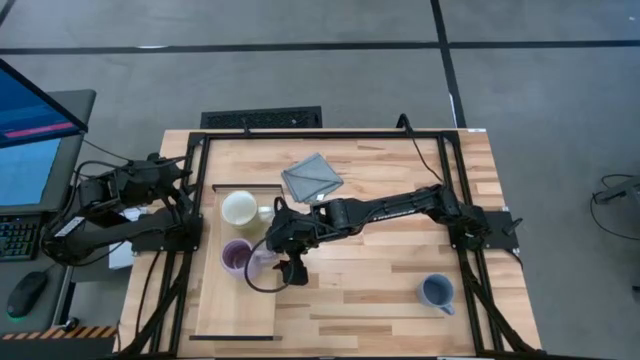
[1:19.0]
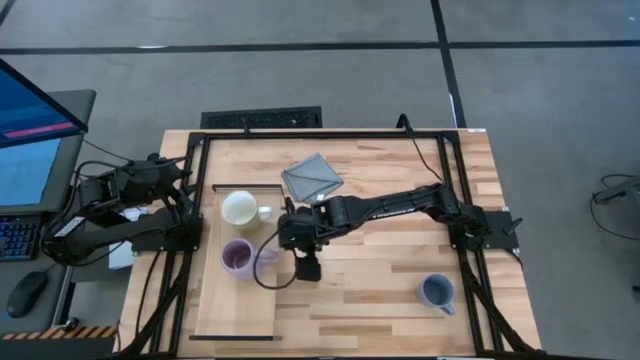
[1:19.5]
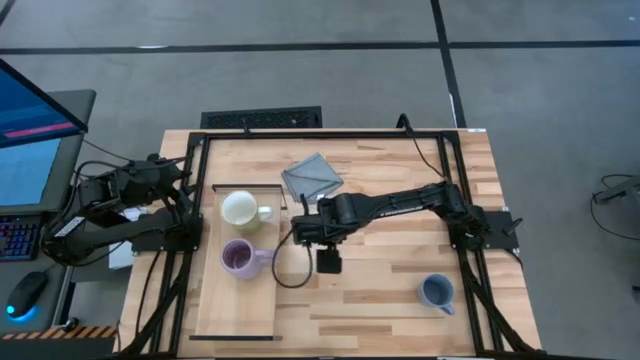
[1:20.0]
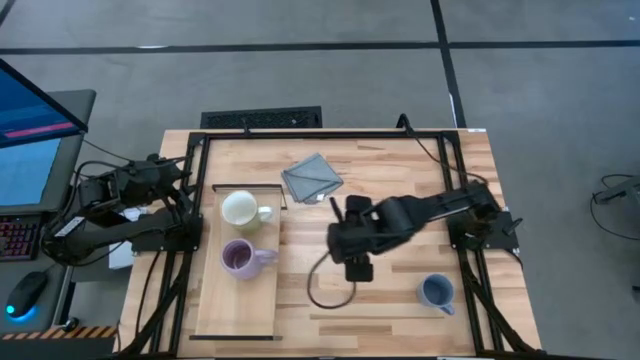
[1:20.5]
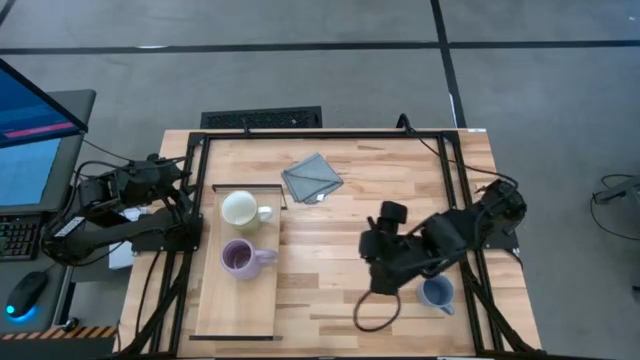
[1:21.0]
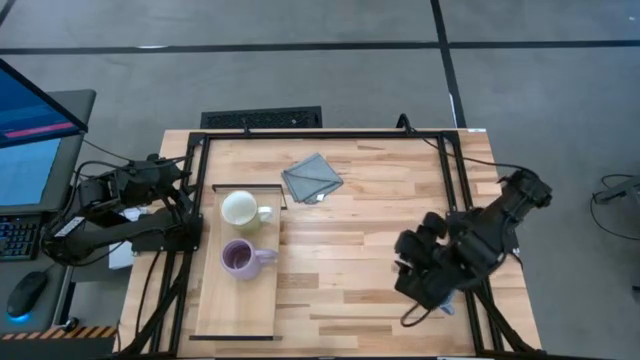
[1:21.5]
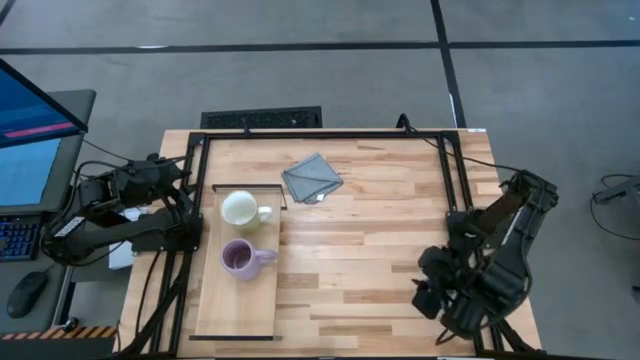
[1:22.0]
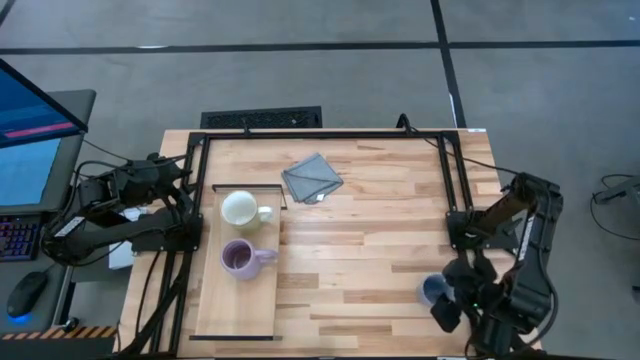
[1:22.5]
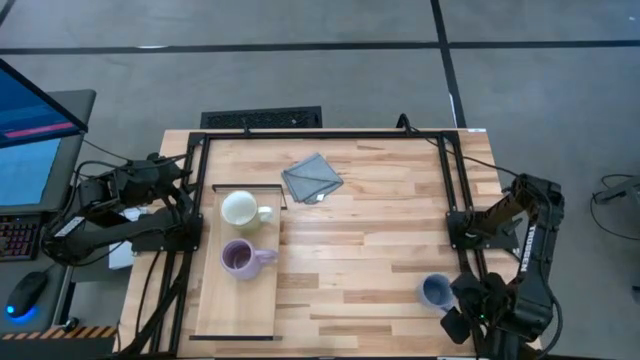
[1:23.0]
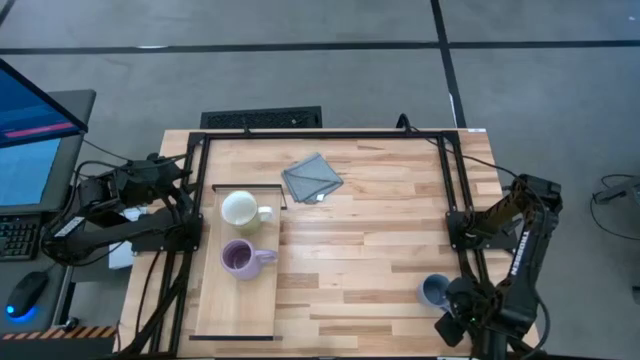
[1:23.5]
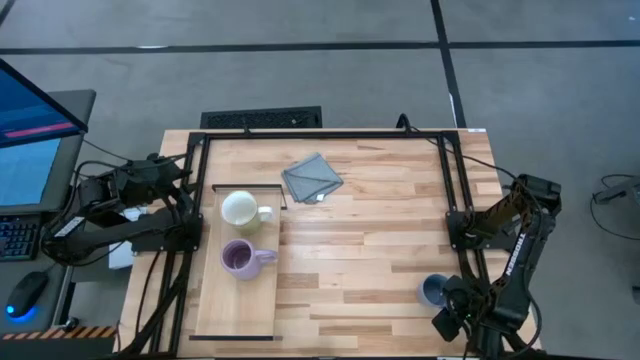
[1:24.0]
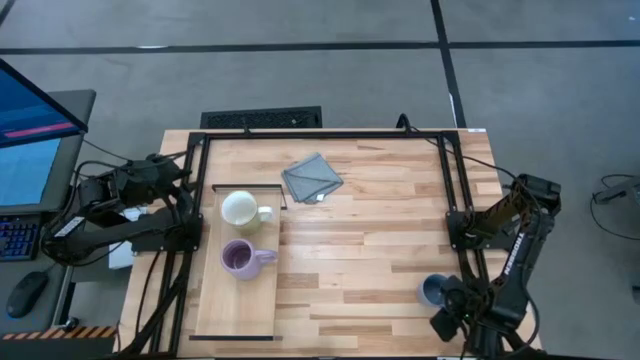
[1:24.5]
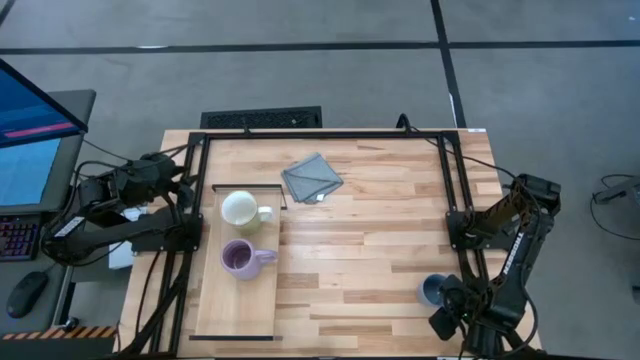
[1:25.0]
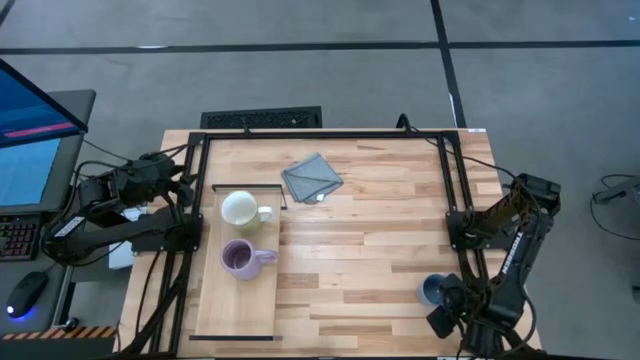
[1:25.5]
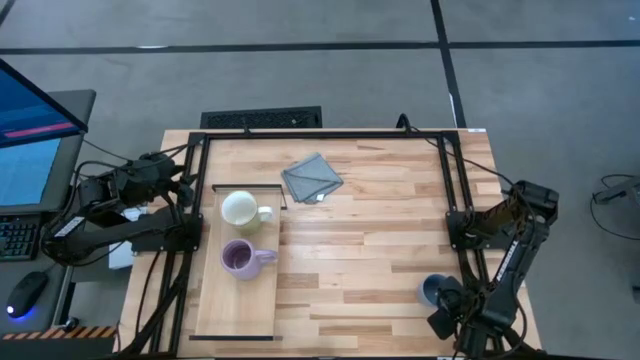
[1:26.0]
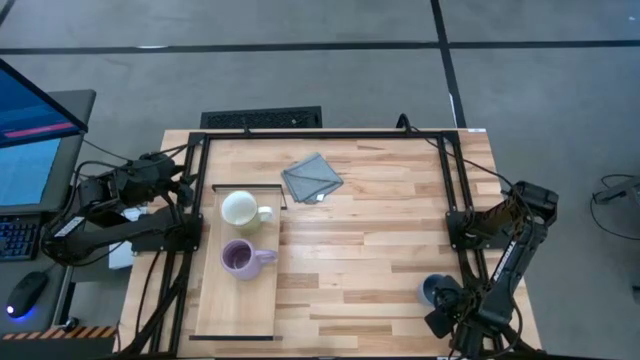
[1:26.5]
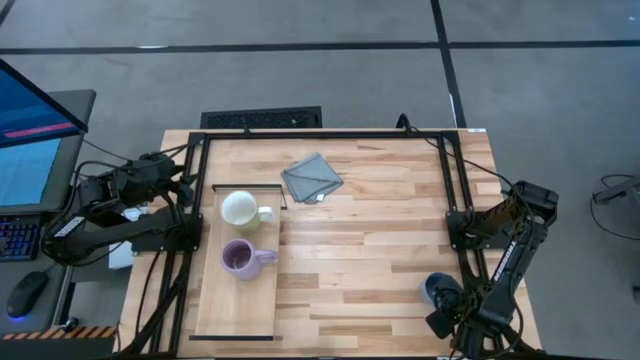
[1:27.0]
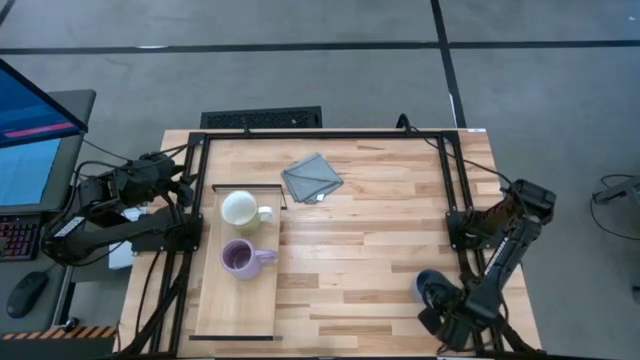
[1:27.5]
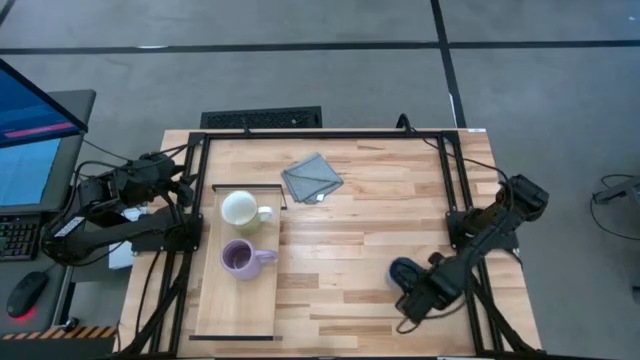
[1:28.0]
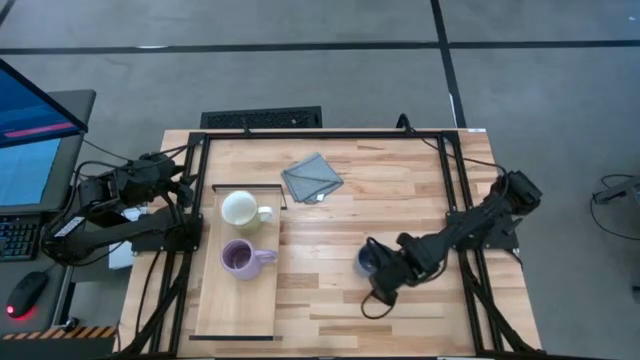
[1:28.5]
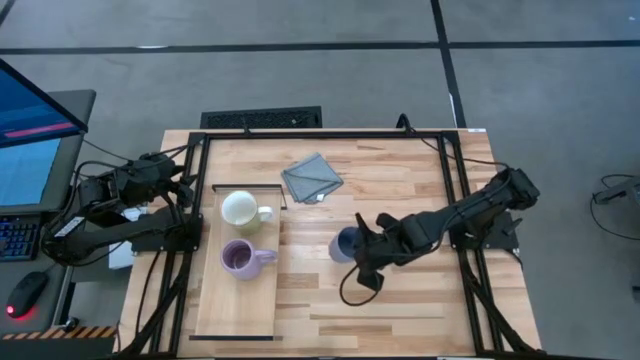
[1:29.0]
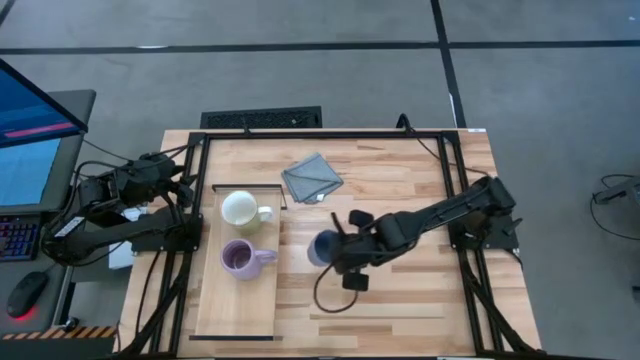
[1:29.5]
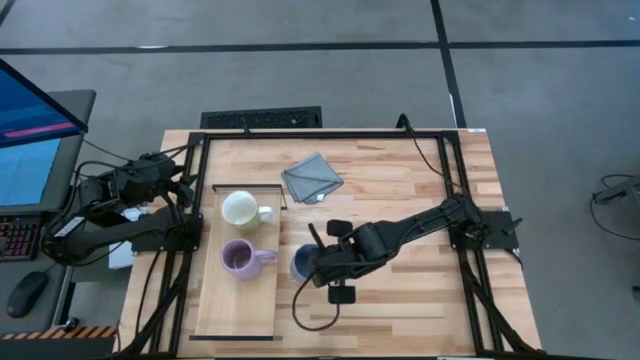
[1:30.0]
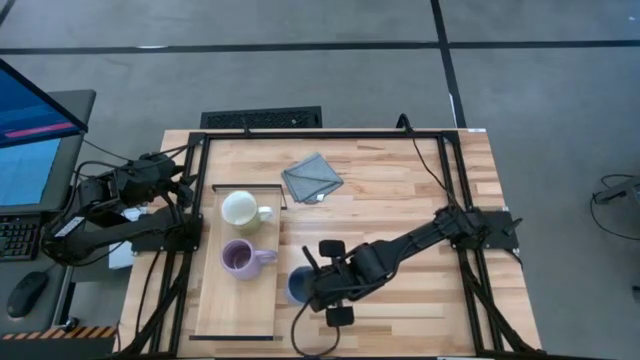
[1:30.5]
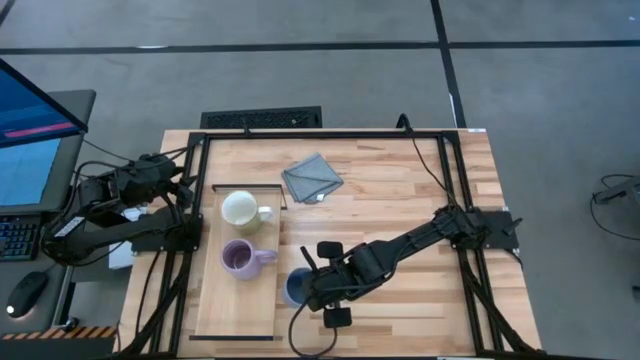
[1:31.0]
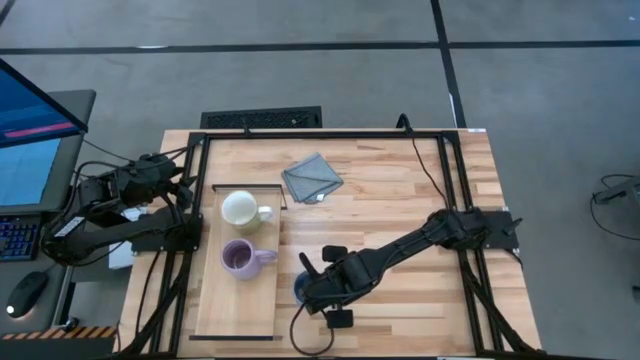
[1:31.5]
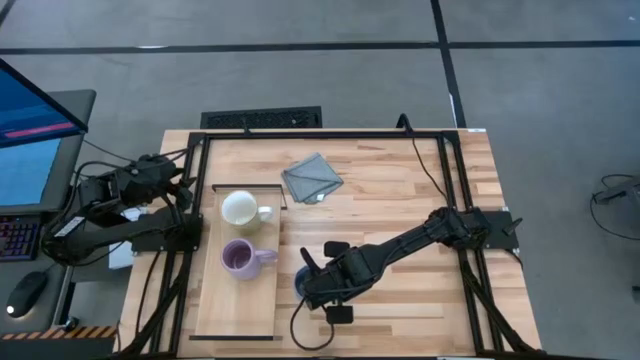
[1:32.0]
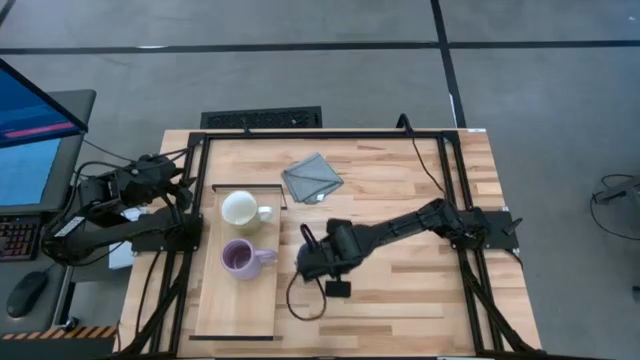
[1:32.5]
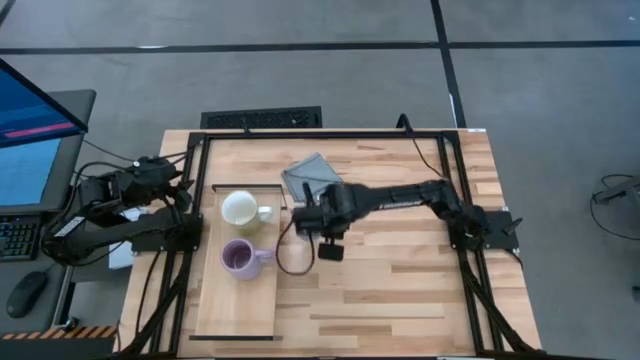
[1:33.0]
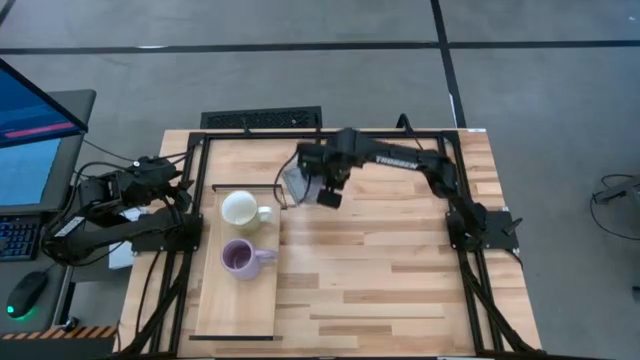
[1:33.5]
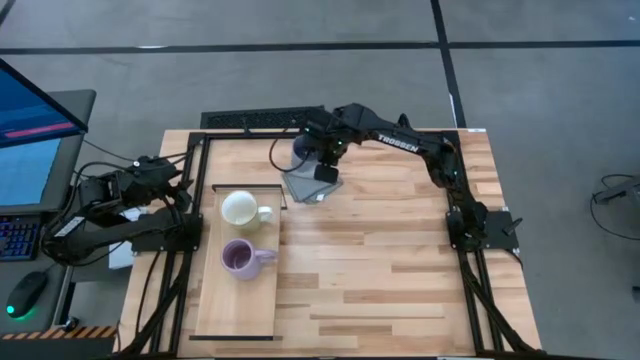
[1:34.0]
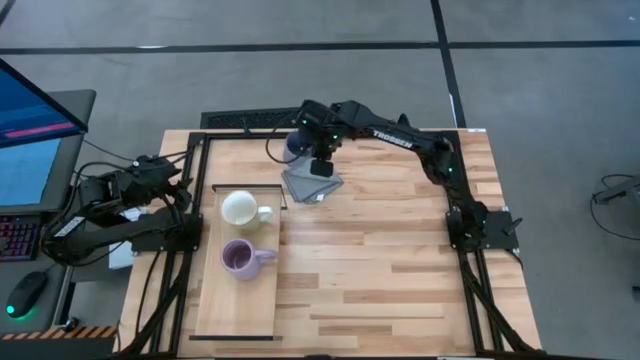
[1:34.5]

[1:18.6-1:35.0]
Task: Stack small to large cups/mugs on shelf
Put the blue mug on the shelf

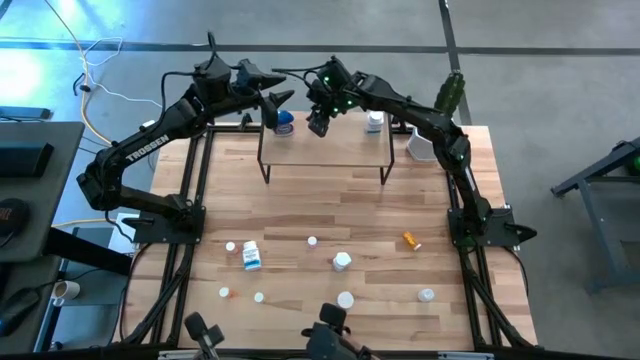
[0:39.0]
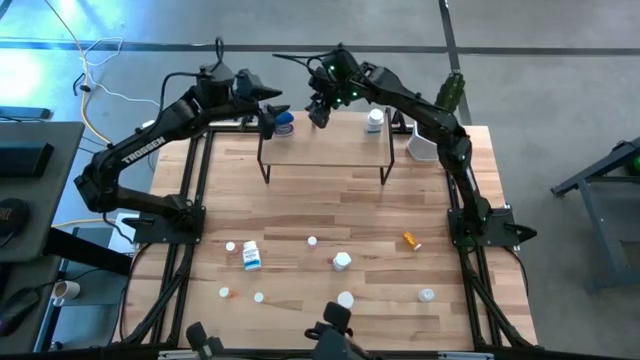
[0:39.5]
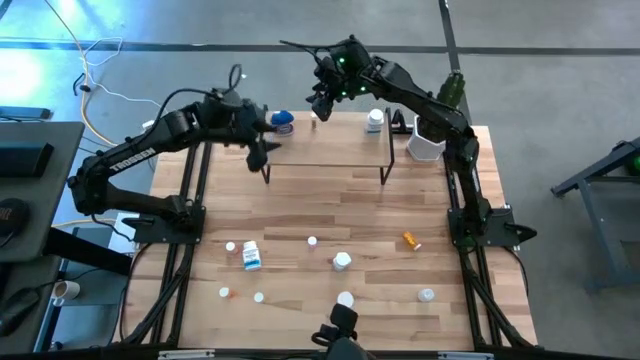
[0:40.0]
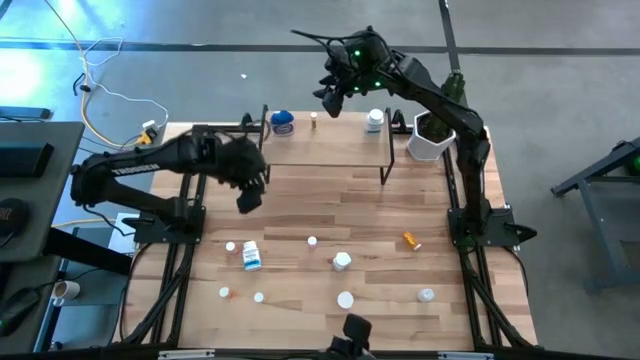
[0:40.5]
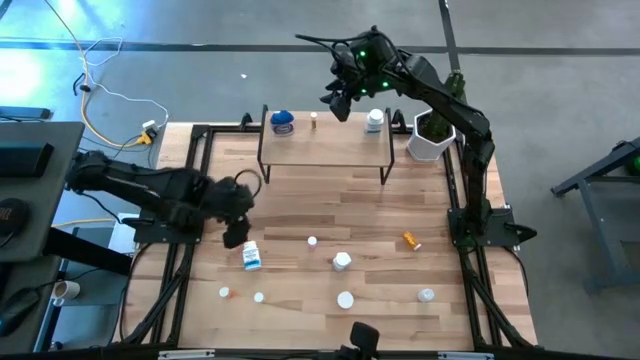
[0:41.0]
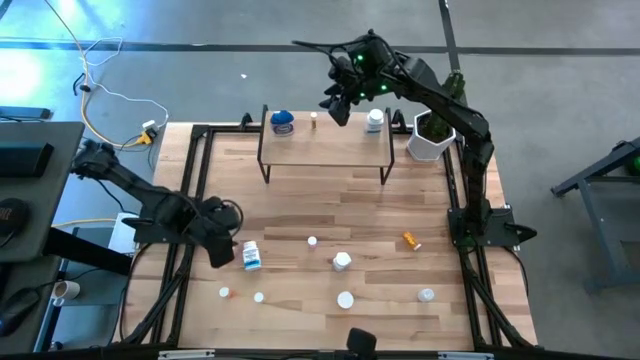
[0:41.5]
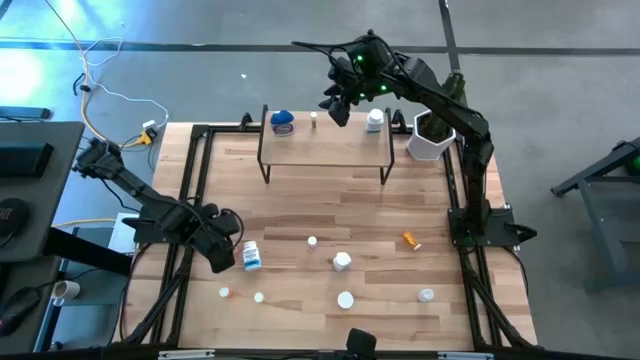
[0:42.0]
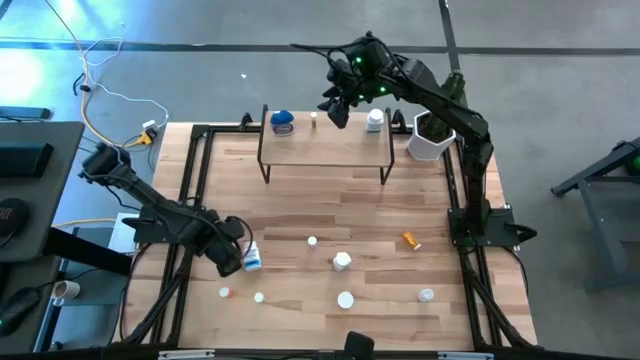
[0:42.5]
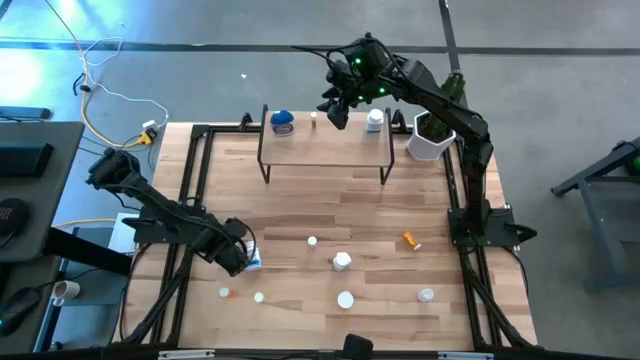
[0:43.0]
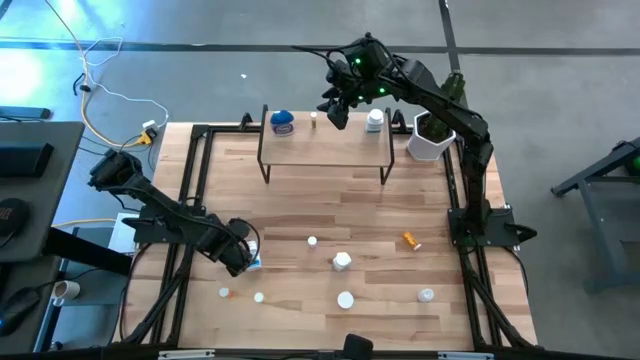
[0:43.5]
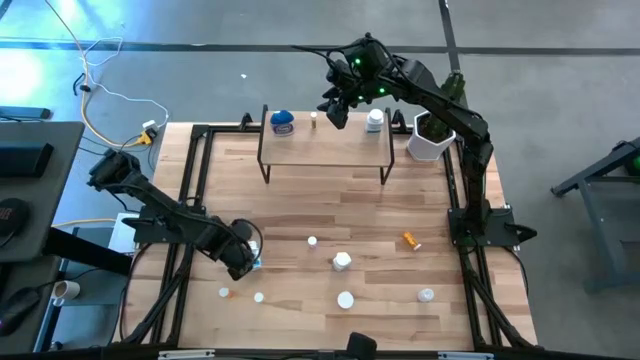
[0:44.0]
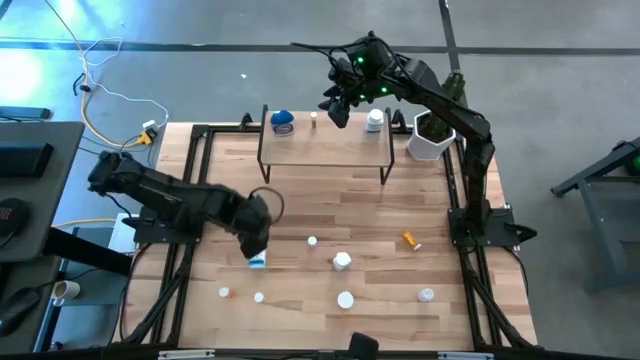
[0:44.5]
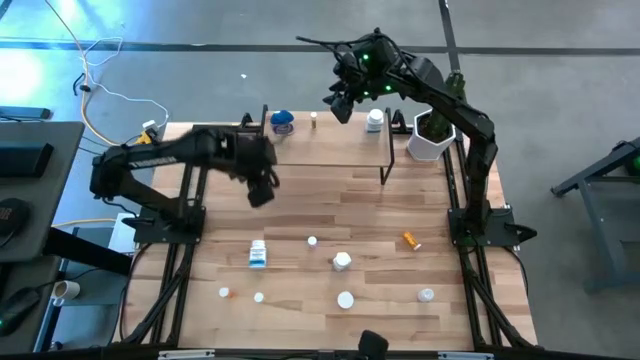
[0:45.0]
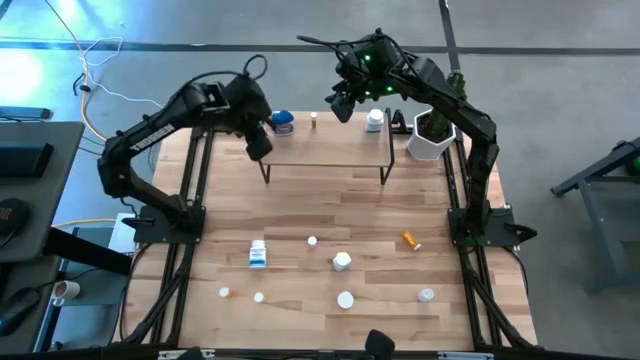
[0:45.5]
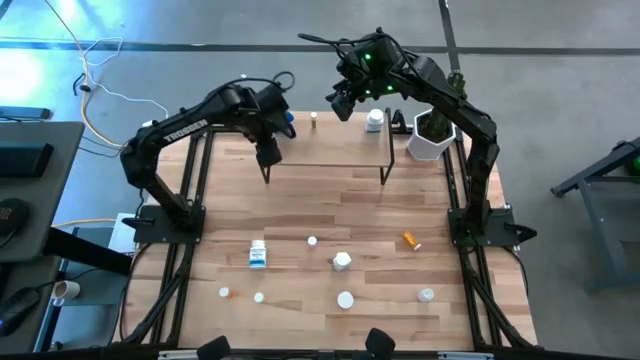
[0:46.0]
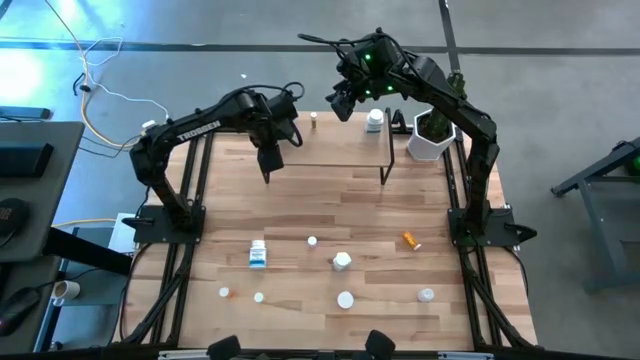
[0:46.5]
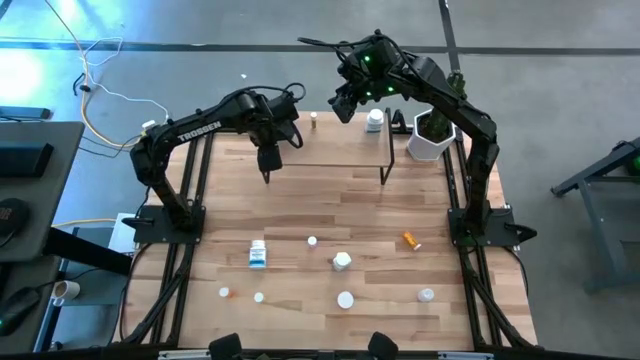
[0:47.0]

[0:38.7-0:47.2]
Task: Pick and place medicine bottles onto shelf by color
Put the pink pill bottle on the shelf
